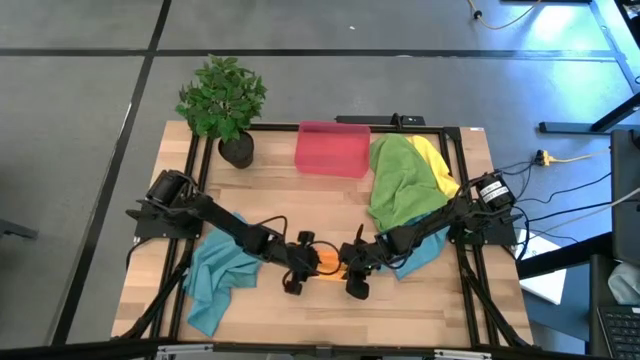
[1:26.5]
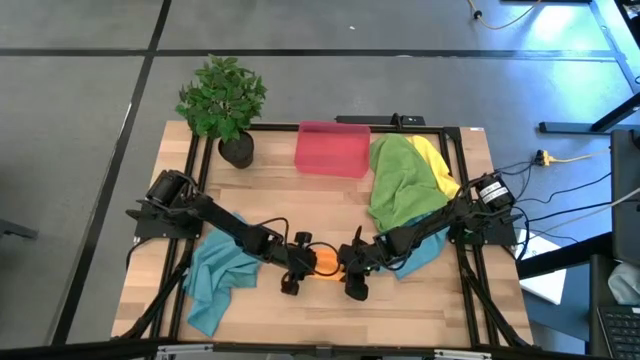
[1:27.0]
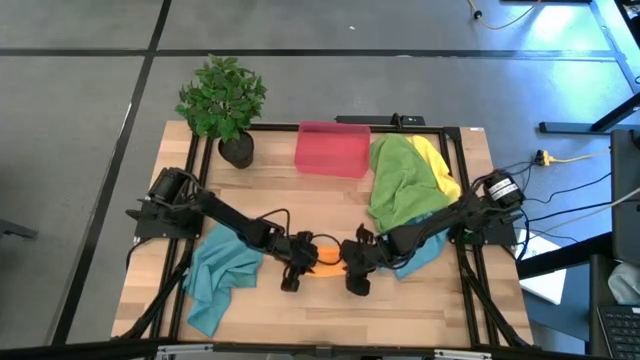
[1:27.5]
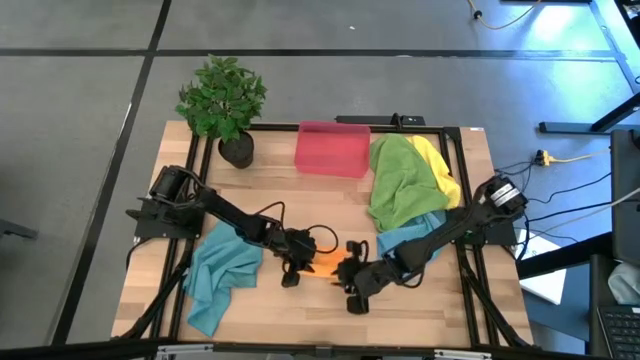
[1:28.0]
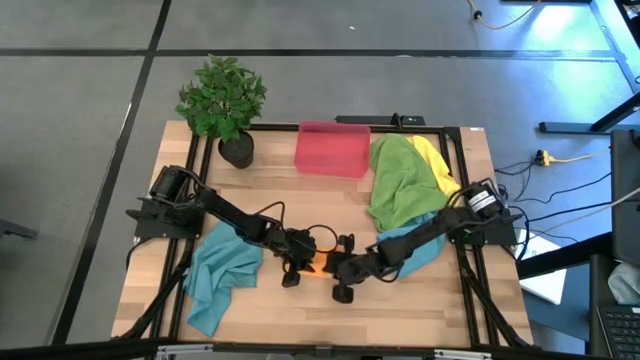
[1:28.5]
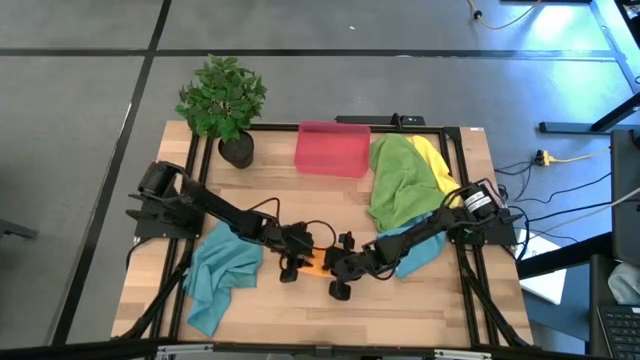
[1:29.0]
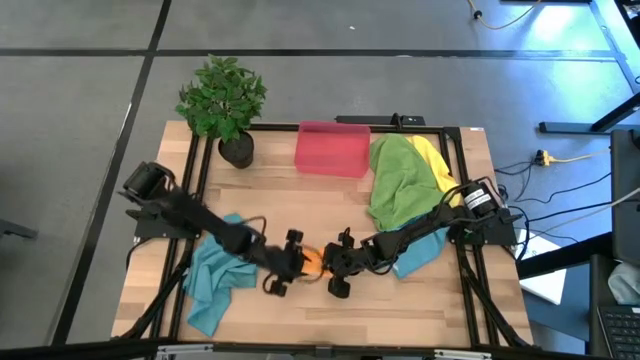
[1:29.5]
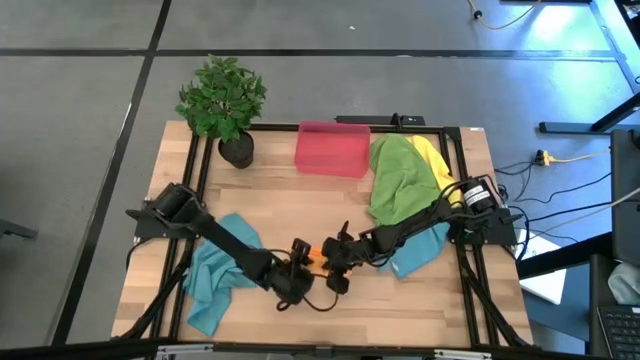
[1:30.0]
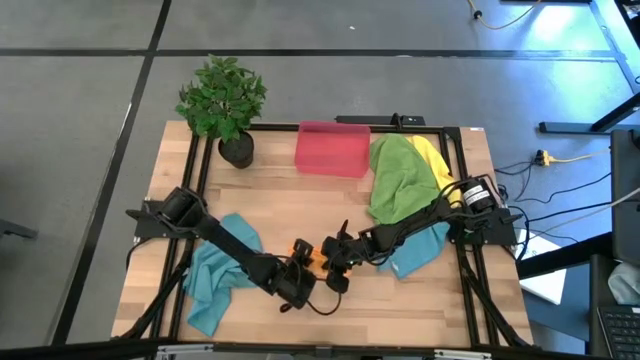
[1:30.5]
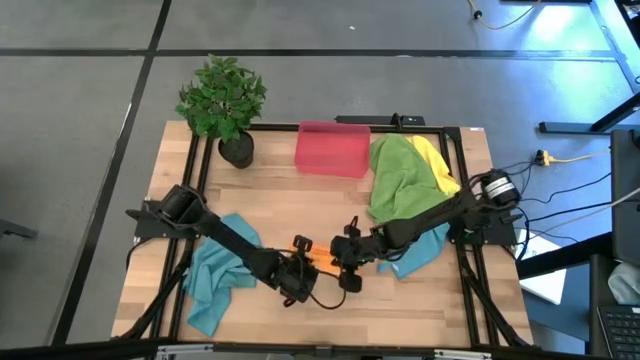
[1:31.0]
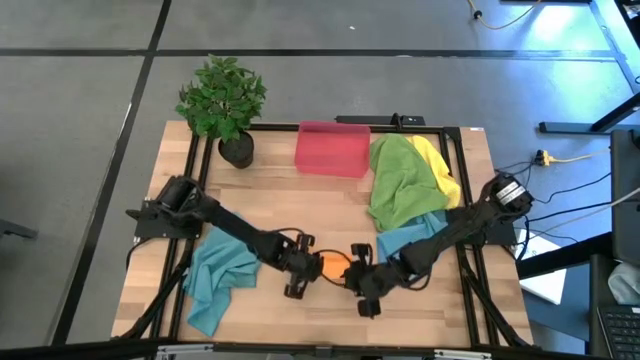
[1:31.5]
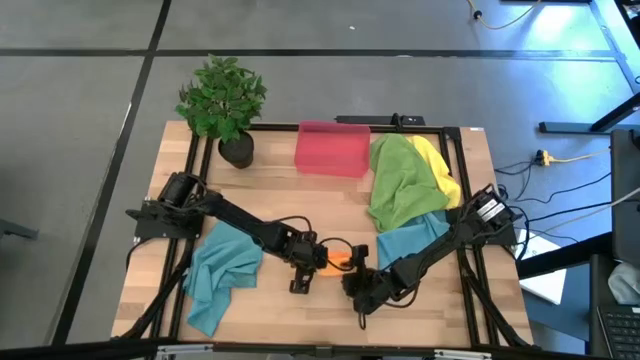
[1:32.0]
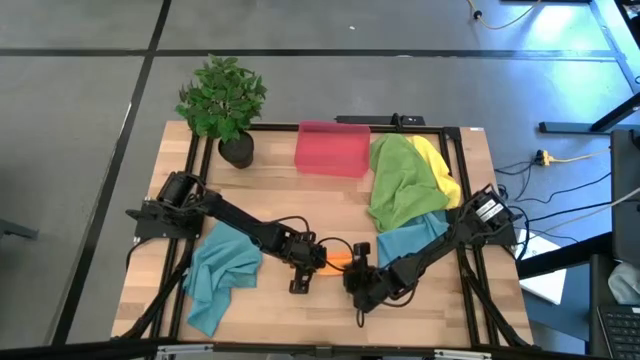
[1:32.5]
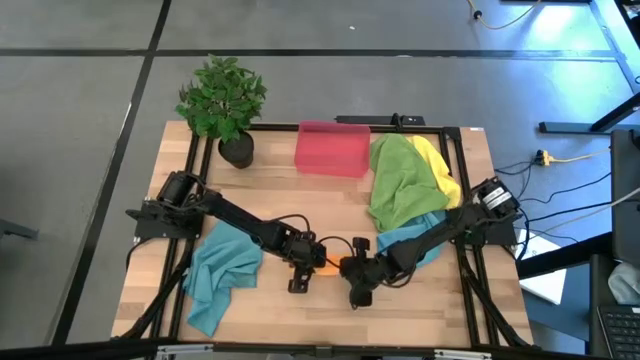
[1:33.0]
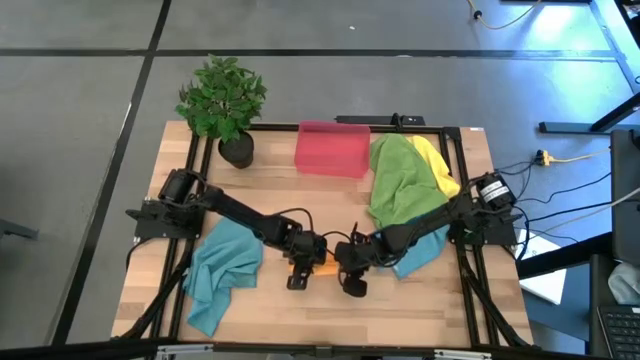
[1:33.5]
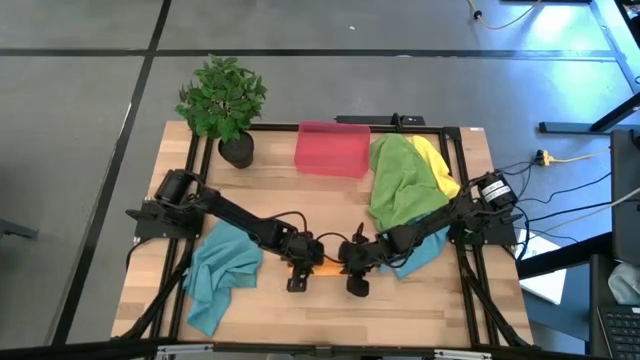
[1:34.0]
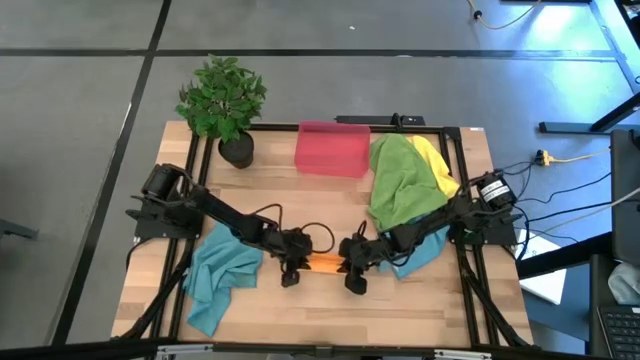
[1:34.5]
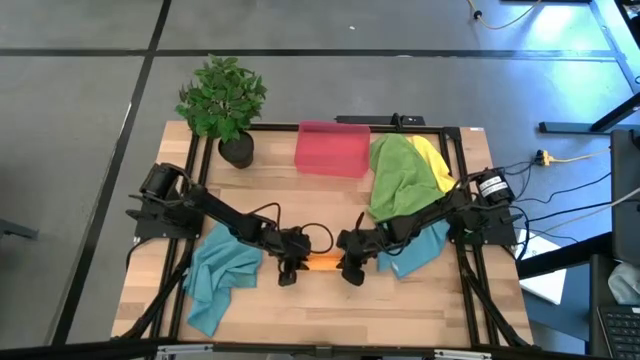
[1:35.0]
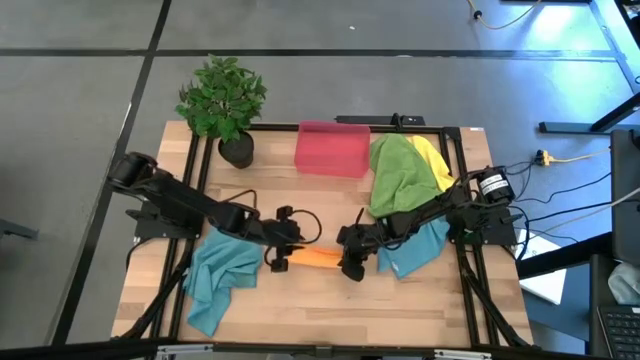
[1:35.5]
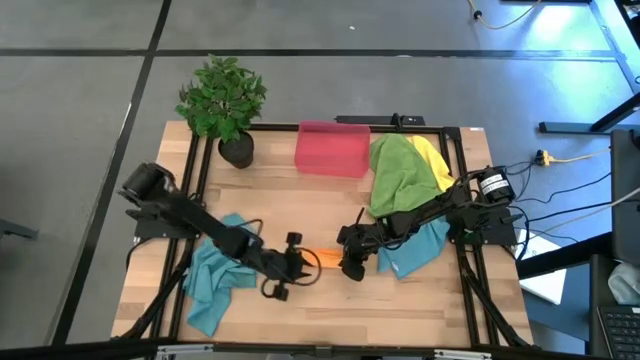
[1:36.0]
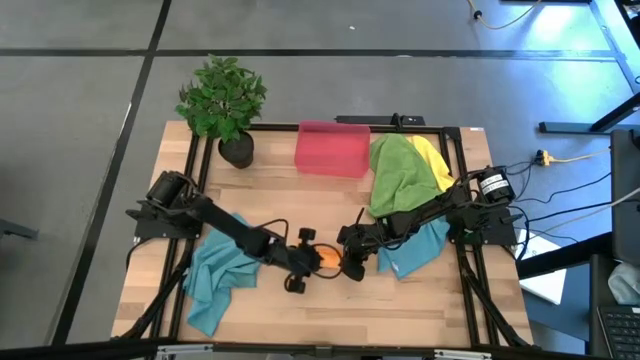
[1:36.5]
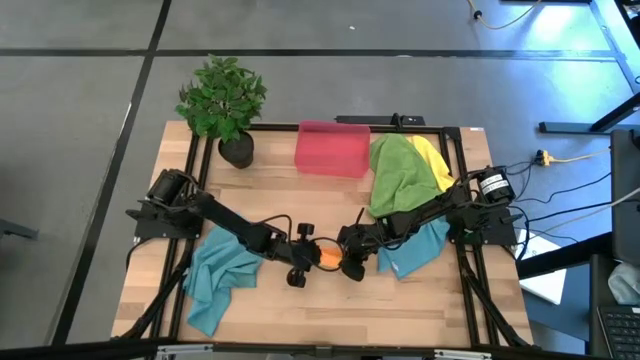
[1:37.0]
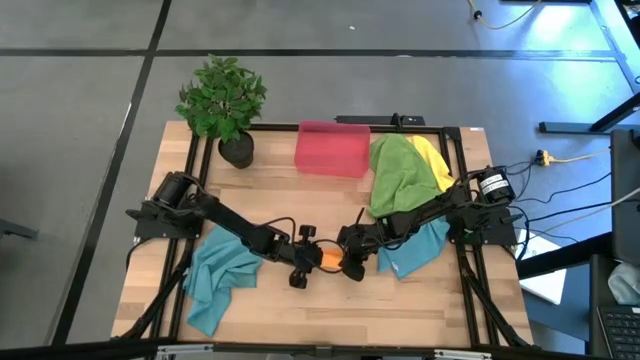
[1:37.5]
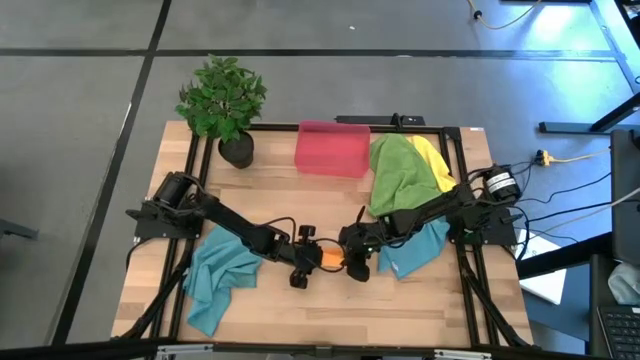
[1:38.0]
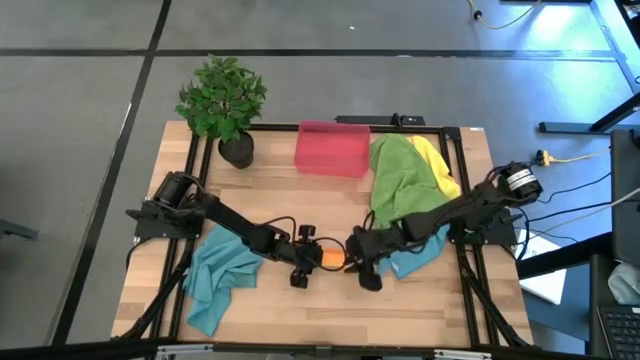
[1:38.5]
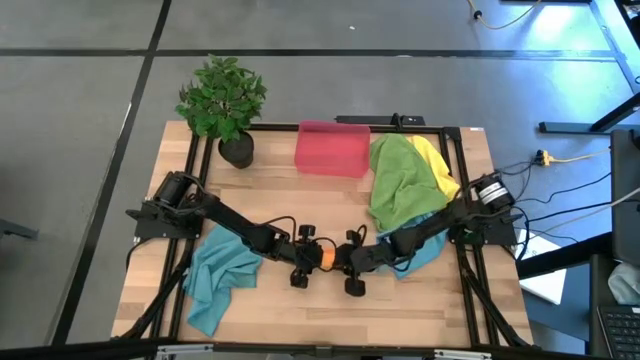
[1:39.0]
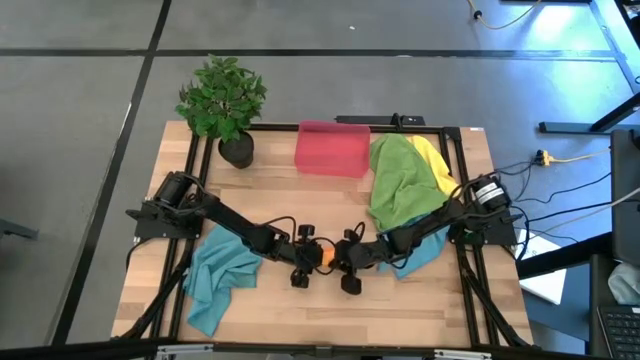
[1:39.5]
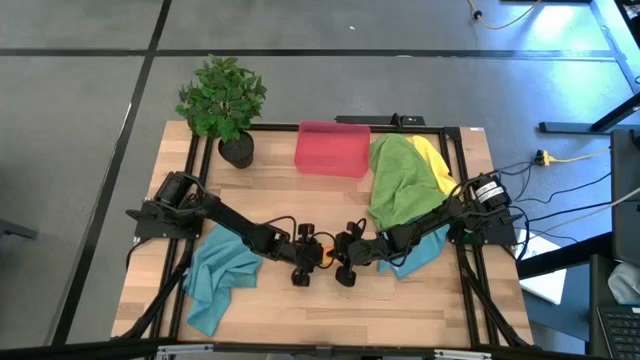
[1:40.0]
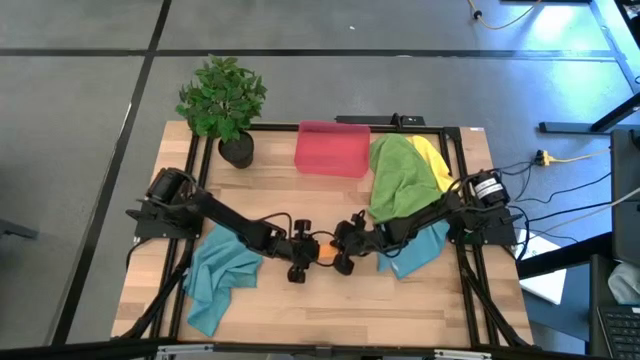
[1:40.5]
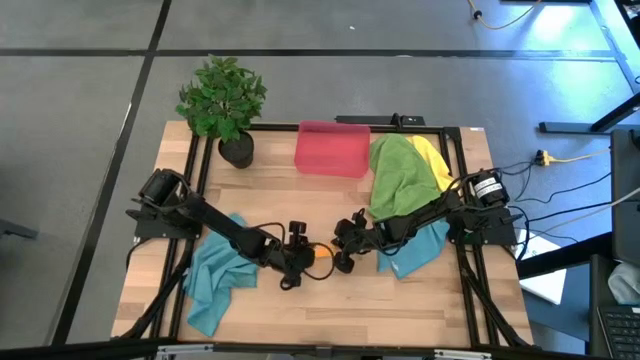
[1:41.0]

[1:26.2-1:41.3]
Task: Roll microfiber towels into tight, uniform cylinder then place into a basket
Roll the orange towel

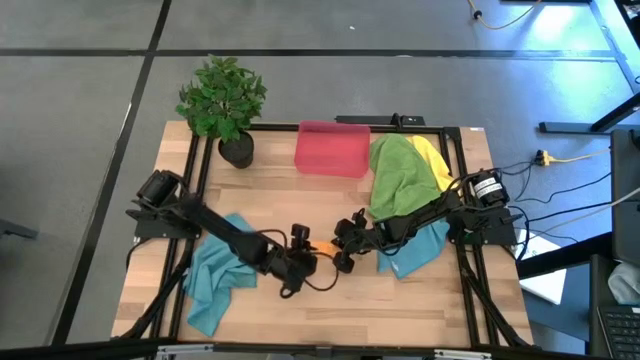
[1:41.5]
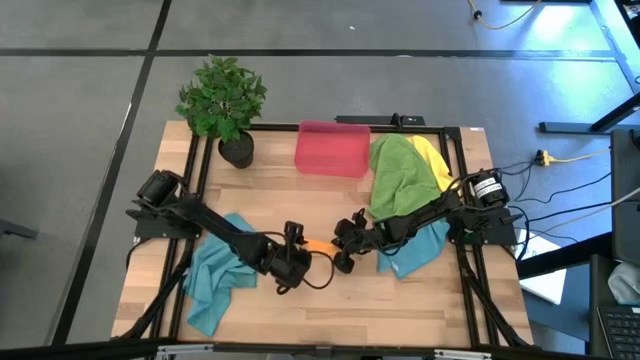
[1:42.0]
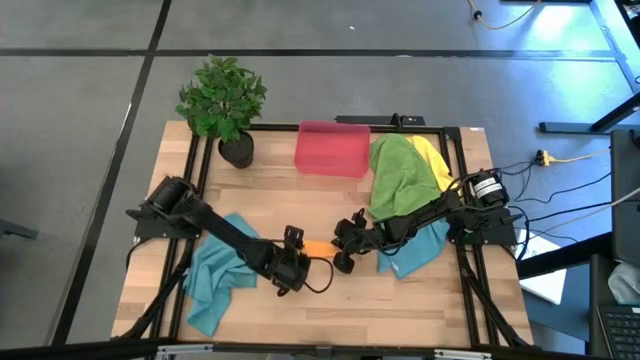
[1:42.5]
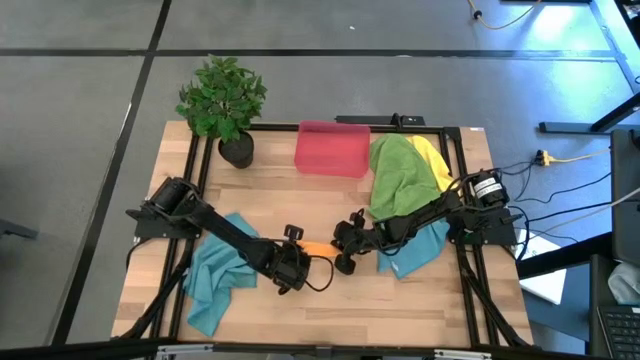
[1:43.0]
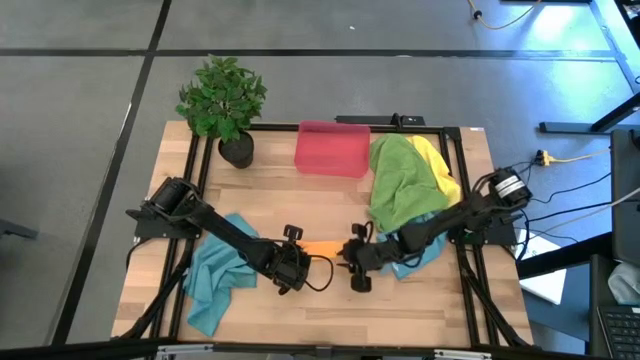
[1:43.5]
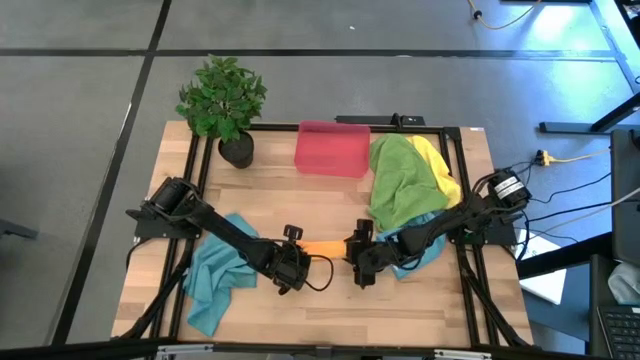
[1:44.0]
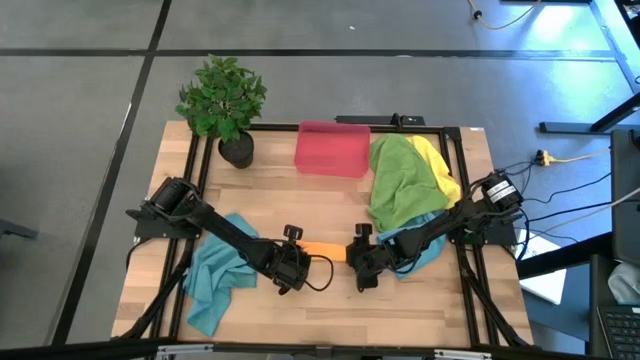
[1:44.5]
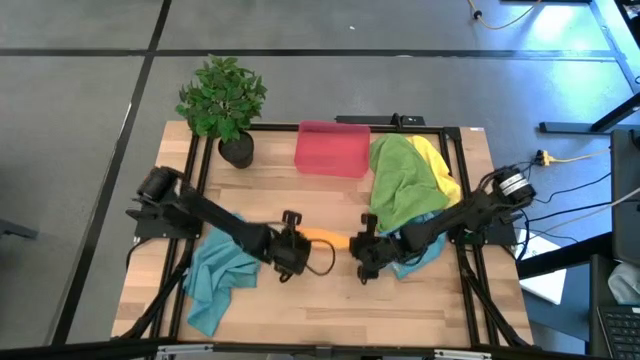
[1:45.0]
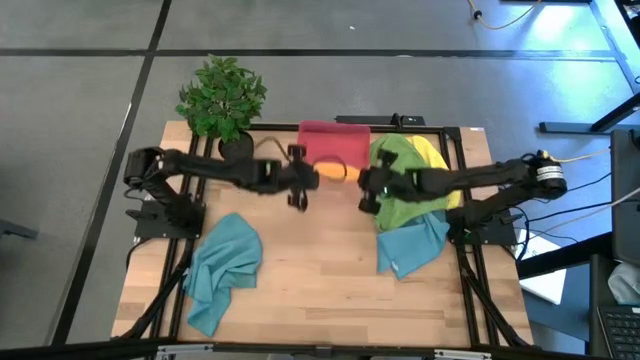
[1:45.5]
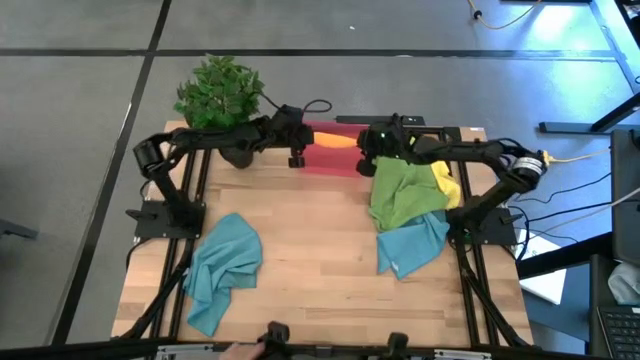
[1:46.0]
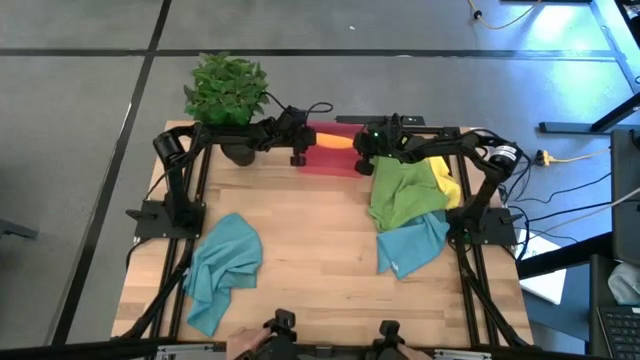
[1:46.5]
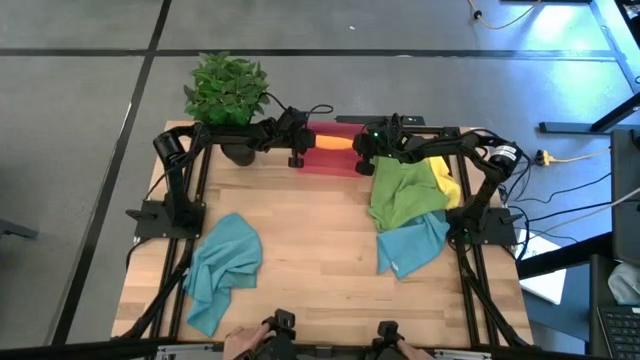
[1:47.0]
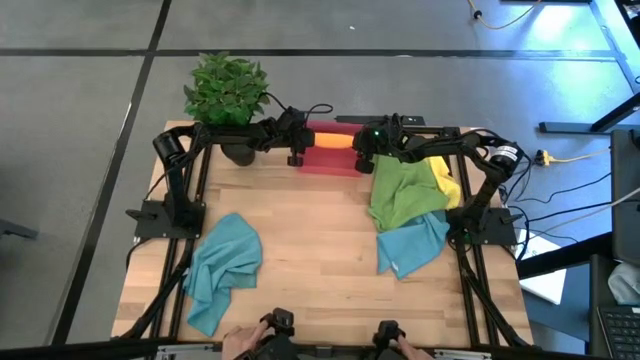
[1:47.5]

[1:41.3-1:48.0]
Put the rolled orange towel into the red bin
